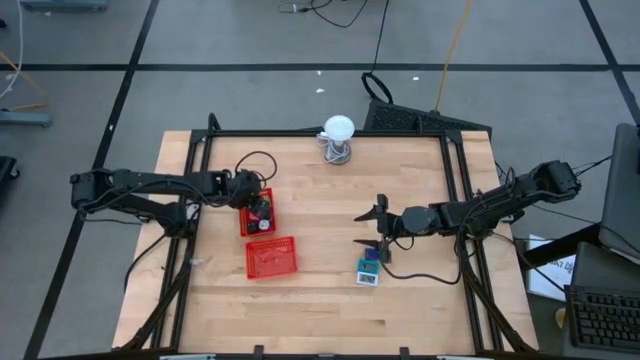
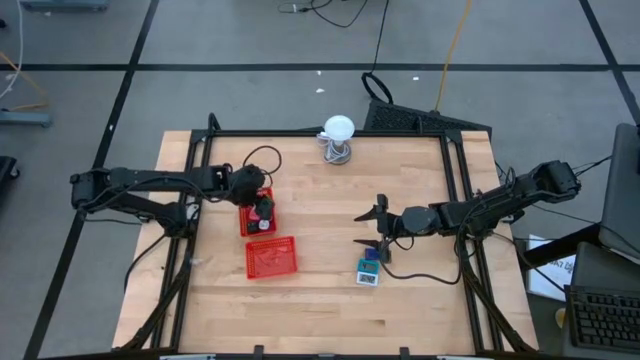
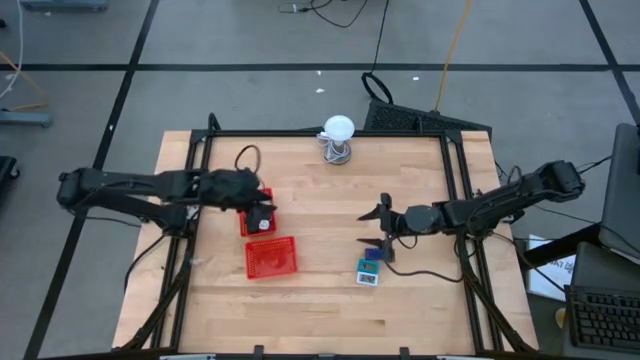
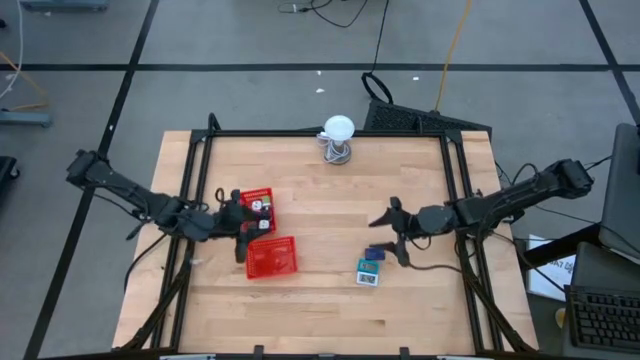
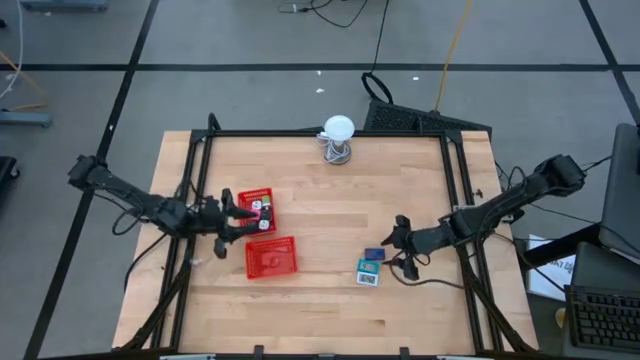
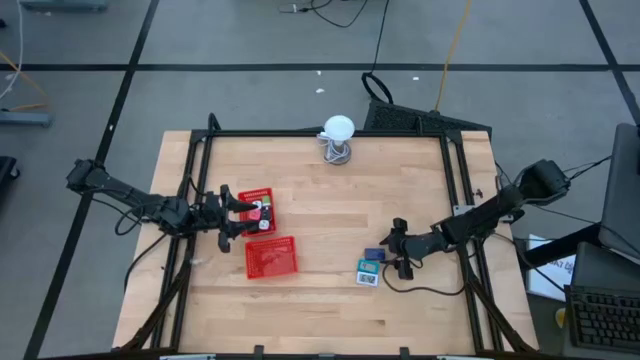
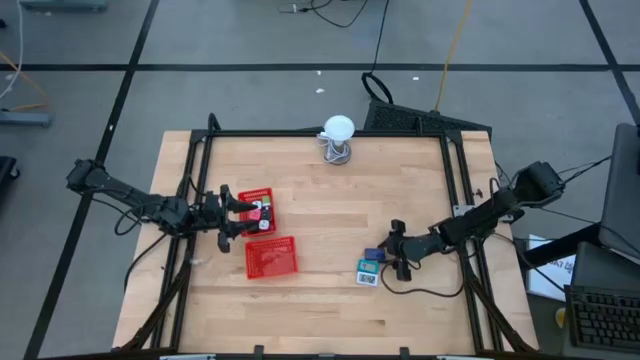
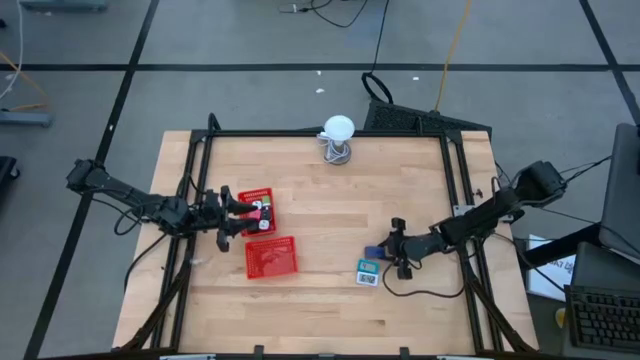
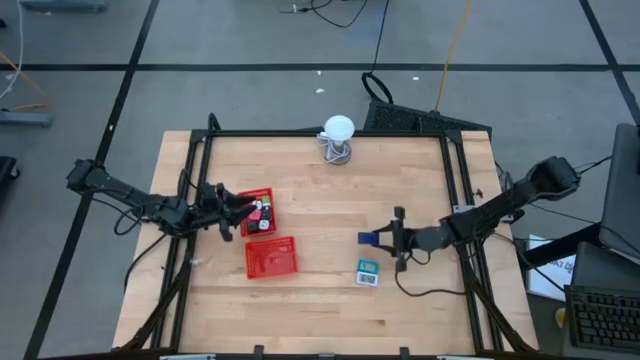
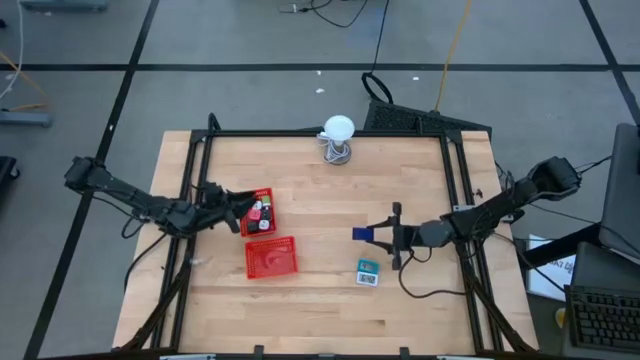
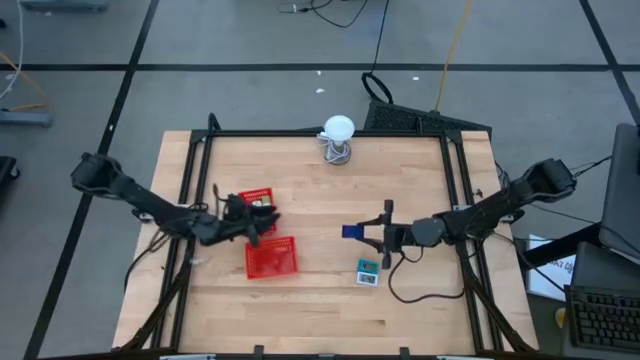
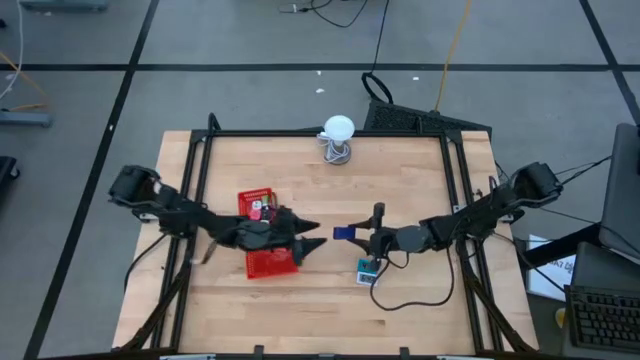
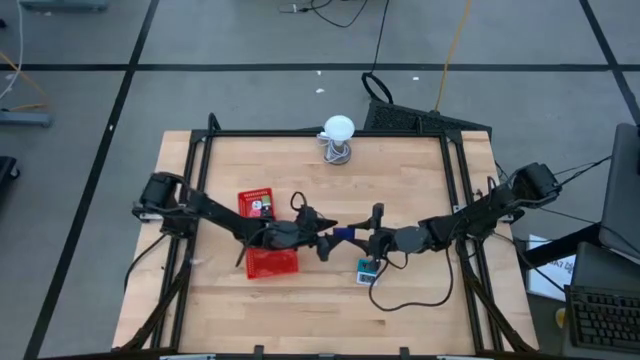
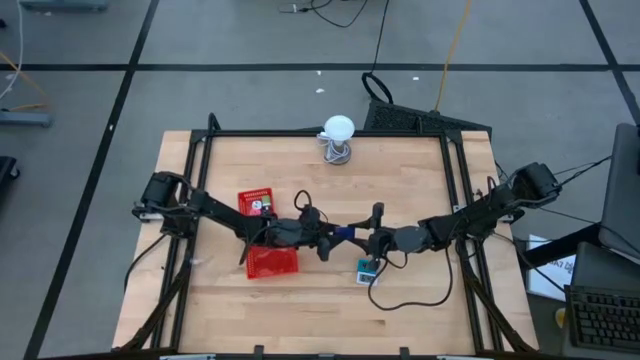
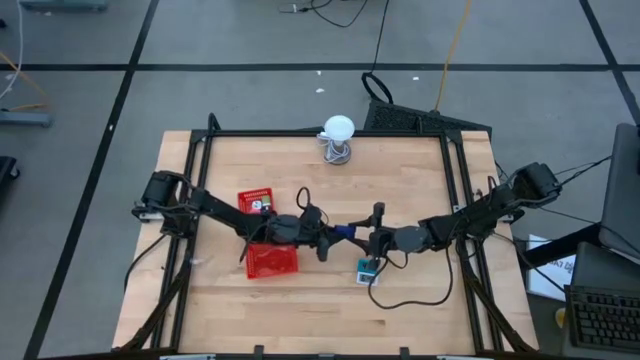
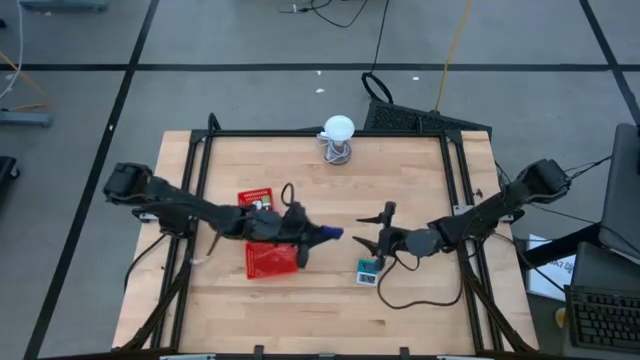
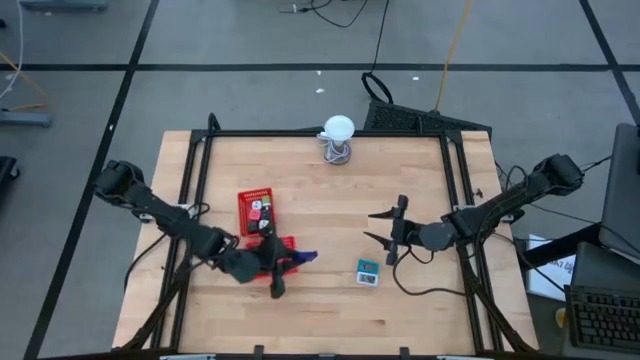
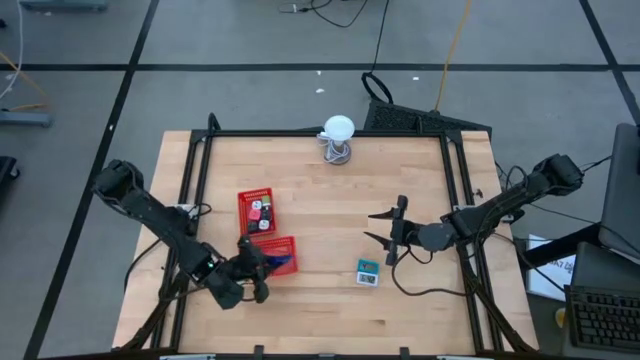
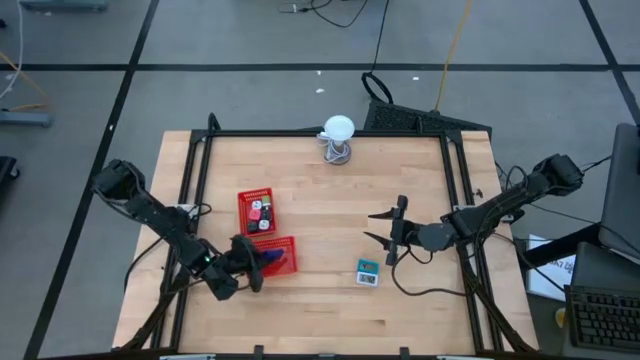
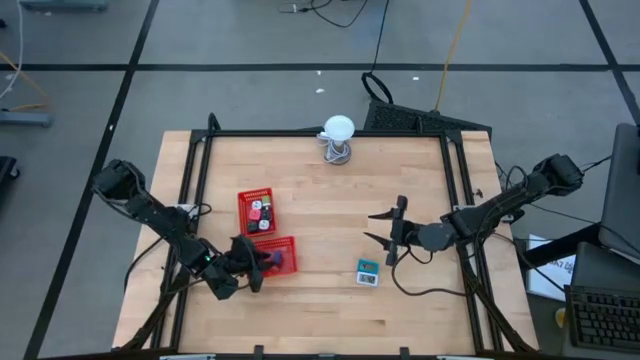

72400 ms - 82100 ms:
Task: Pick & Place Office items
Put the dark blue digital timer into the bottom red basket

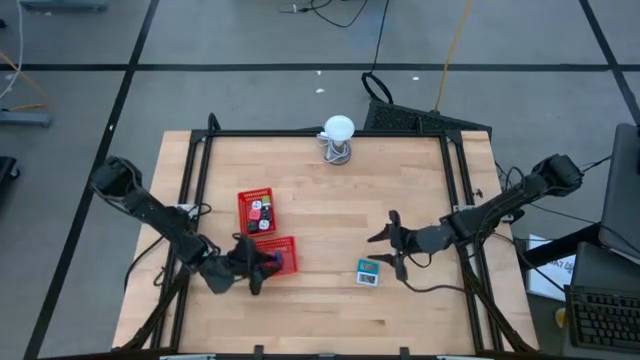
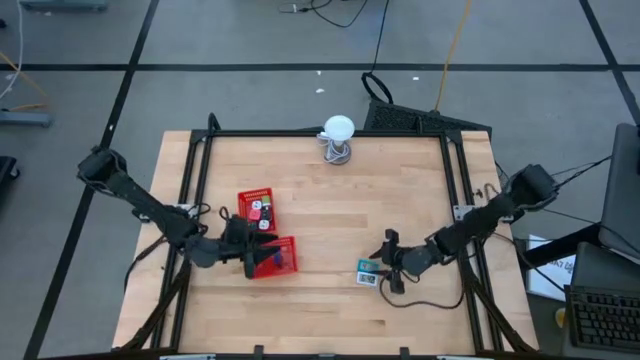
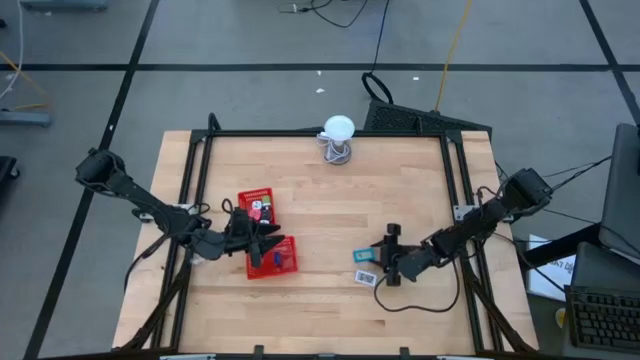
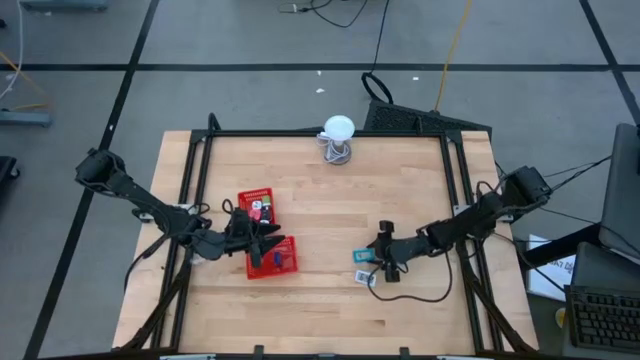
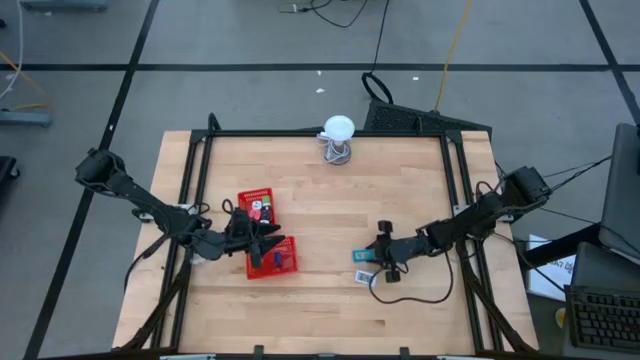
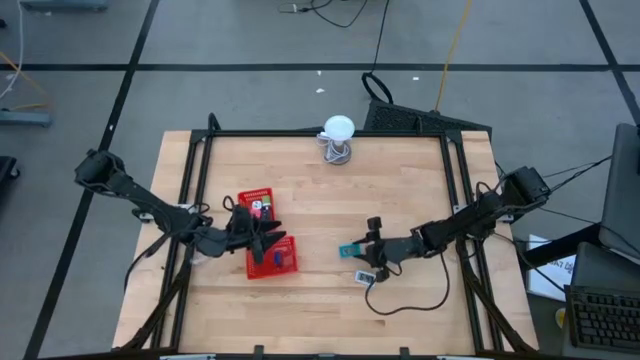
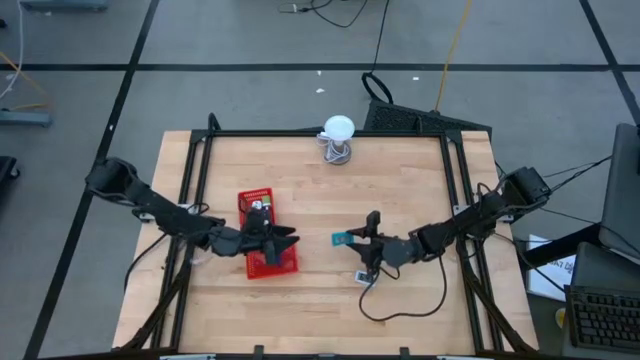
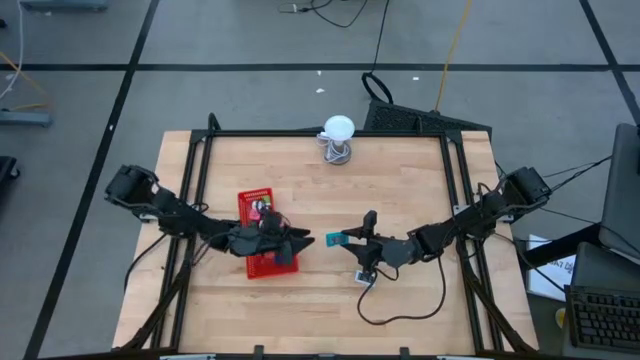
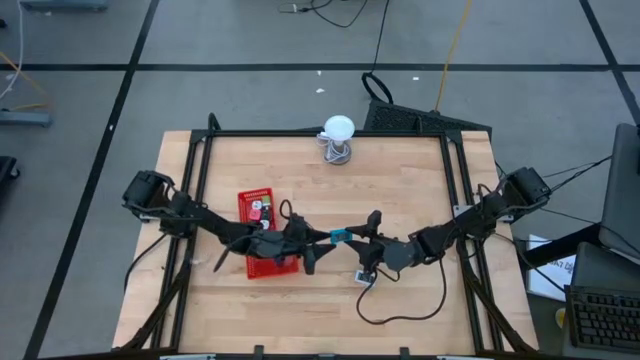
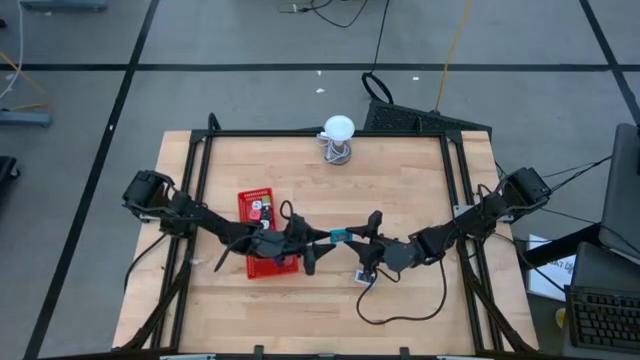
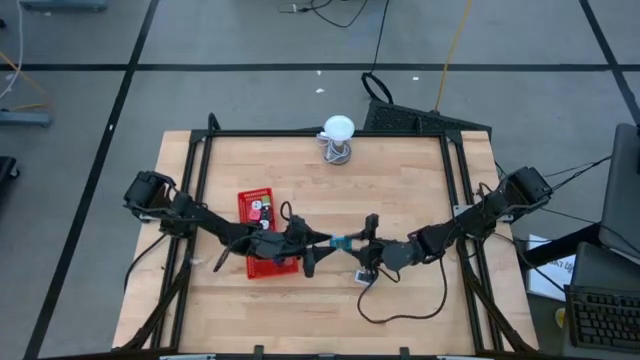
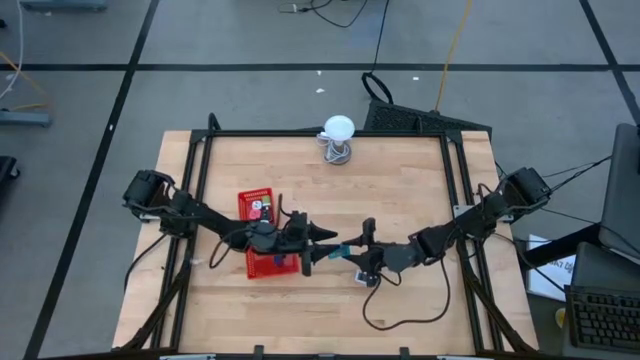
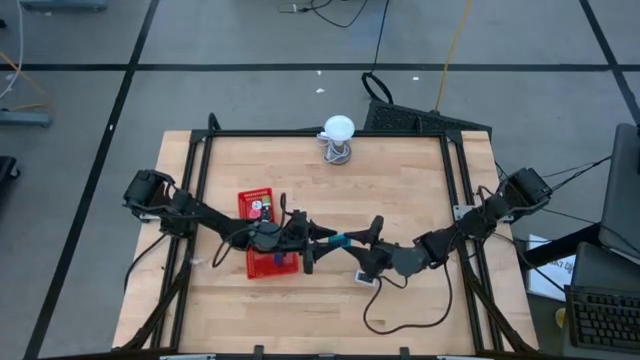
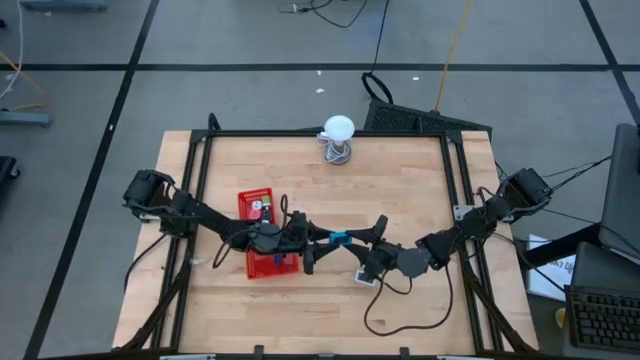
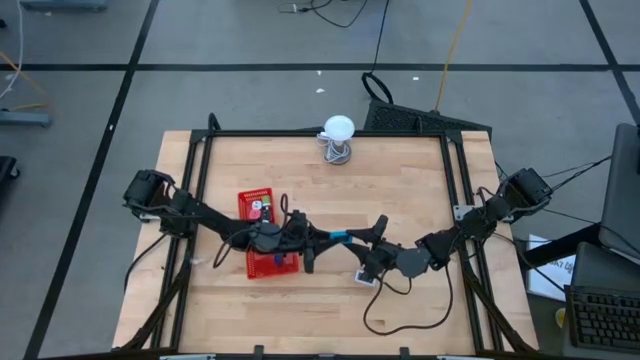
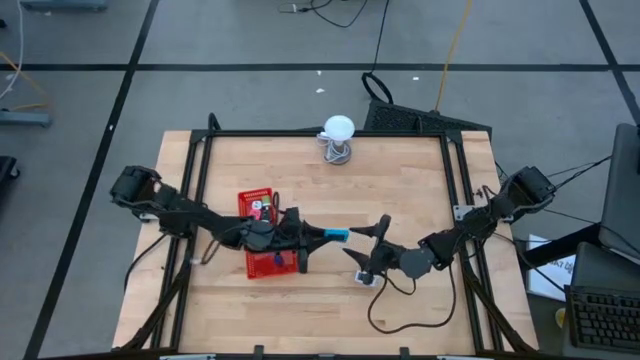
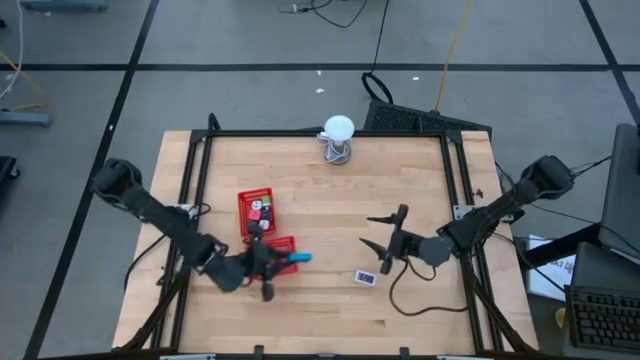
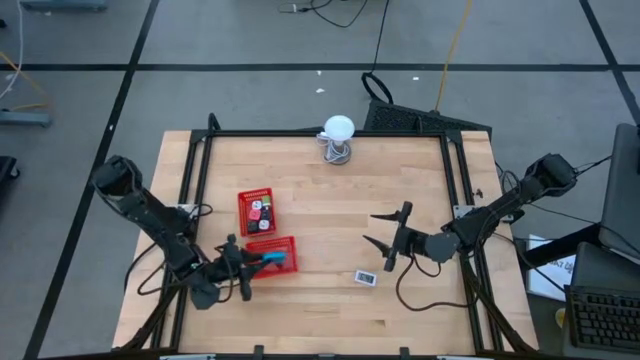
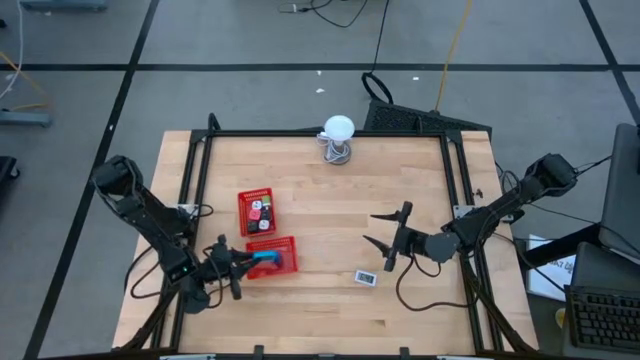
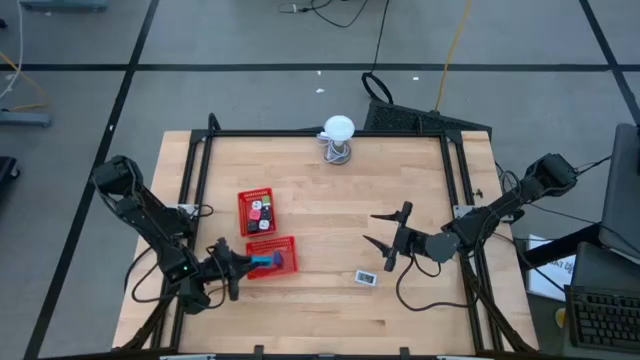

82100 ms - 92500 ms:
Put the blue digital timer into the bottom red basket
